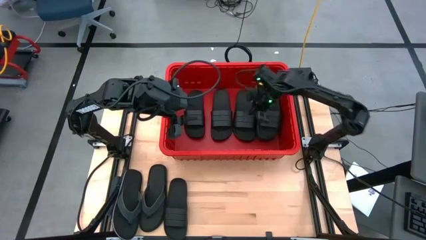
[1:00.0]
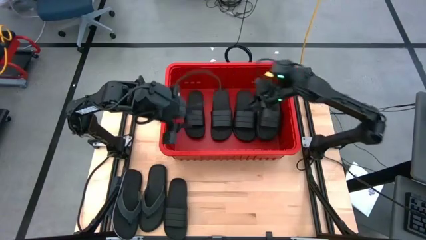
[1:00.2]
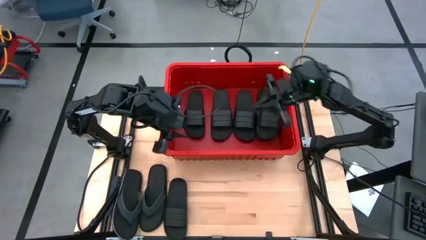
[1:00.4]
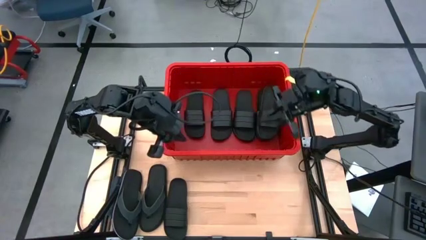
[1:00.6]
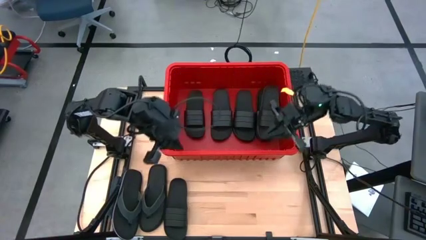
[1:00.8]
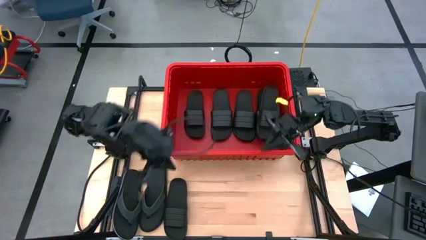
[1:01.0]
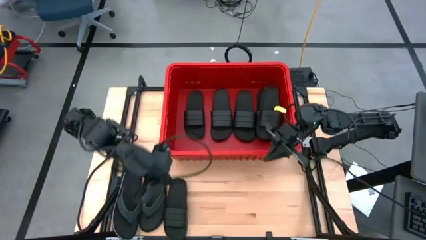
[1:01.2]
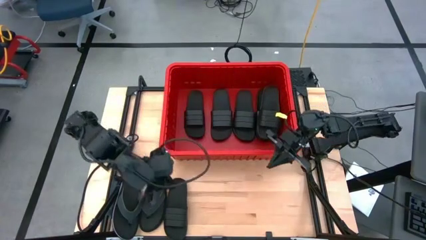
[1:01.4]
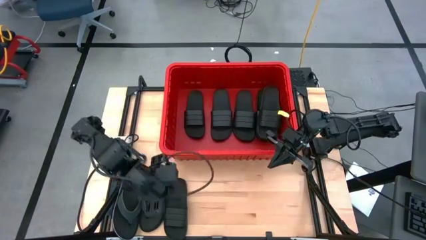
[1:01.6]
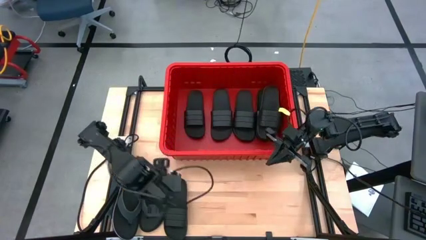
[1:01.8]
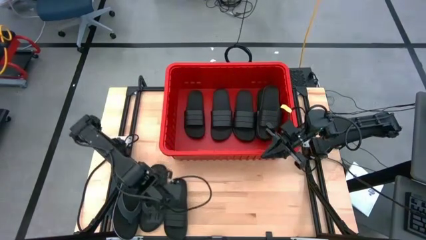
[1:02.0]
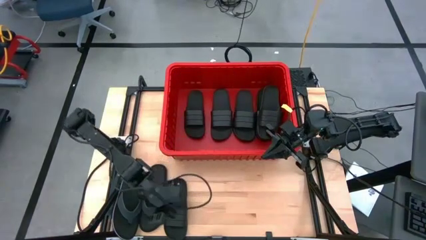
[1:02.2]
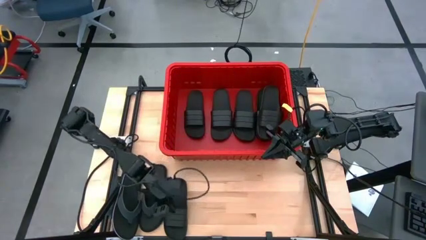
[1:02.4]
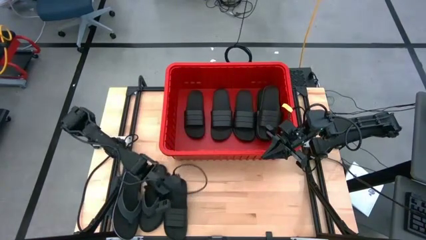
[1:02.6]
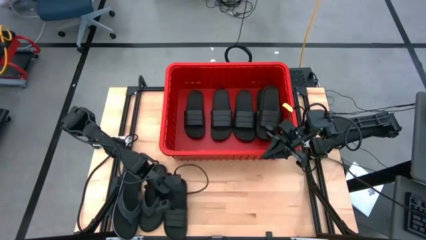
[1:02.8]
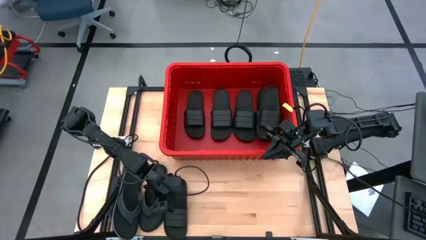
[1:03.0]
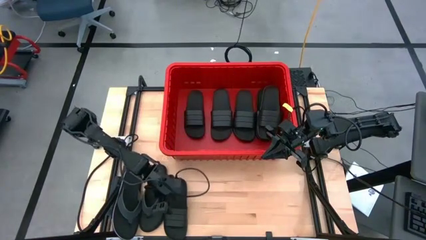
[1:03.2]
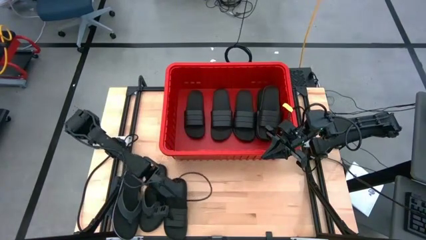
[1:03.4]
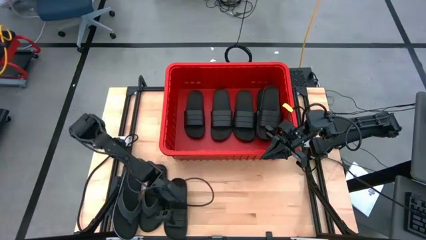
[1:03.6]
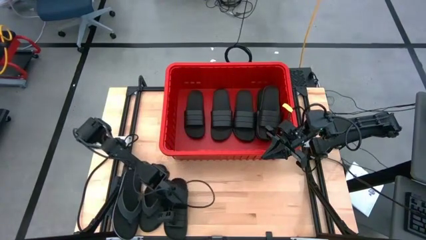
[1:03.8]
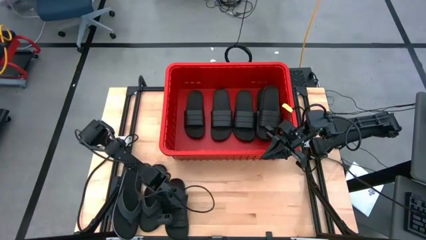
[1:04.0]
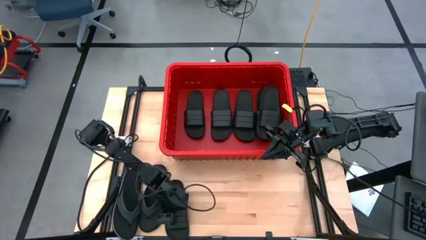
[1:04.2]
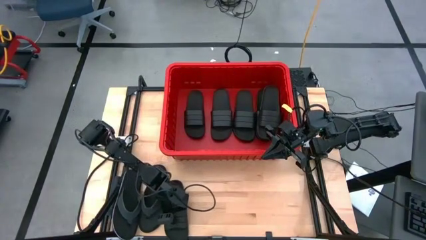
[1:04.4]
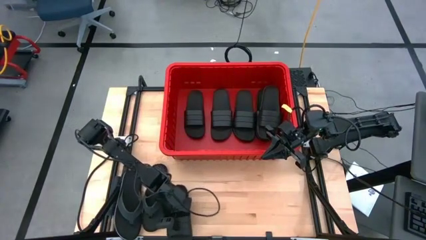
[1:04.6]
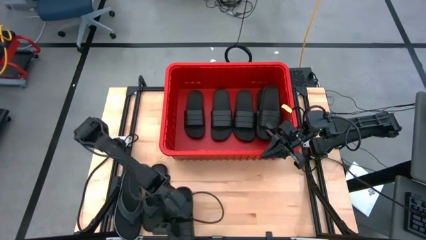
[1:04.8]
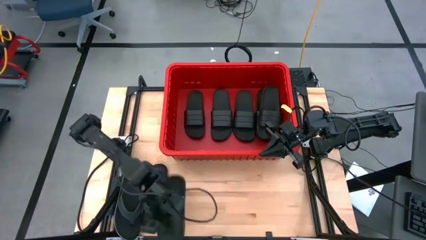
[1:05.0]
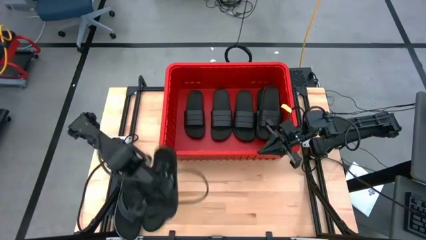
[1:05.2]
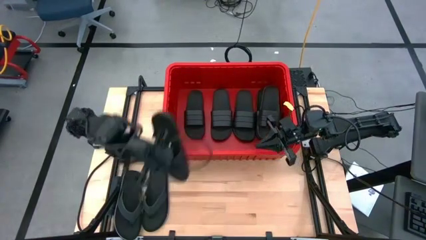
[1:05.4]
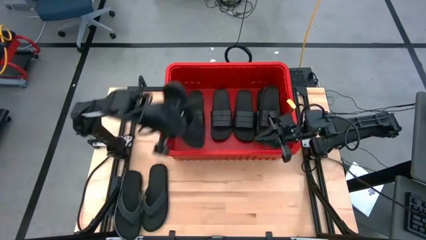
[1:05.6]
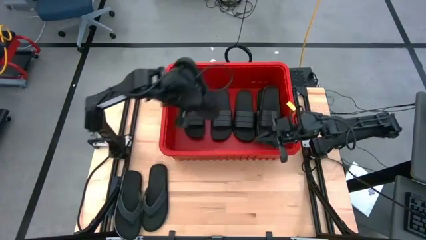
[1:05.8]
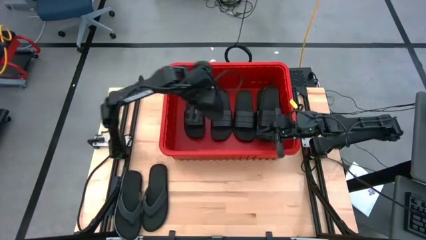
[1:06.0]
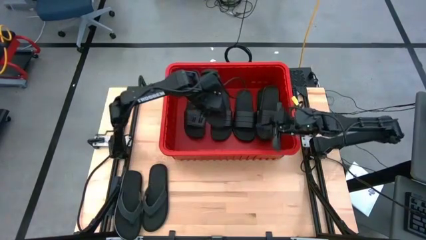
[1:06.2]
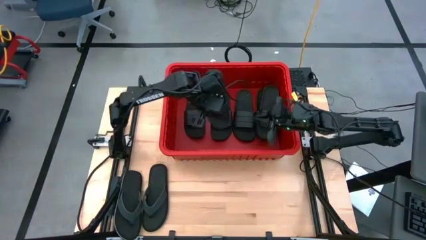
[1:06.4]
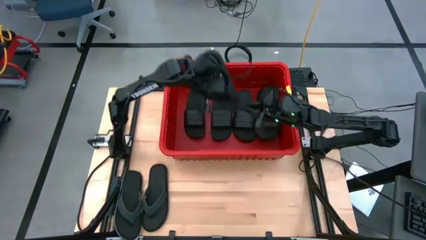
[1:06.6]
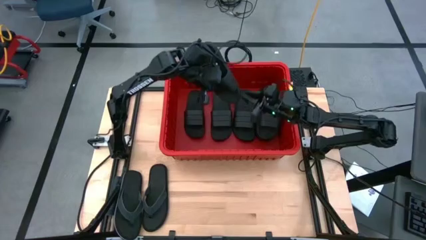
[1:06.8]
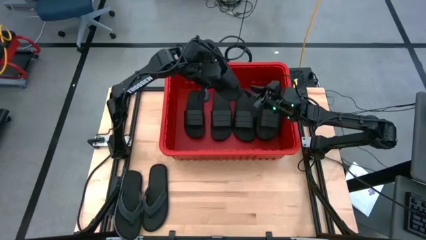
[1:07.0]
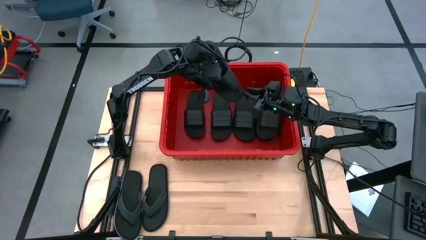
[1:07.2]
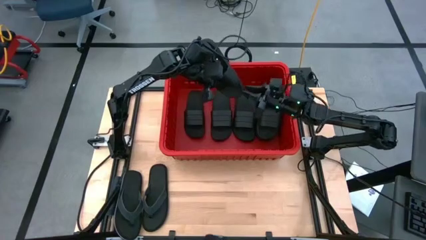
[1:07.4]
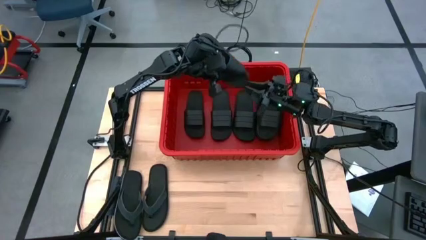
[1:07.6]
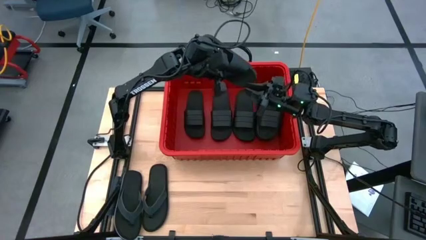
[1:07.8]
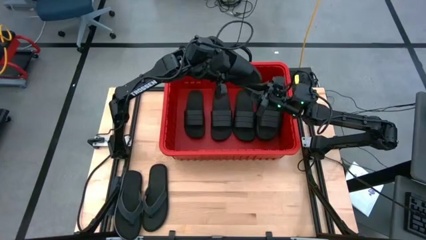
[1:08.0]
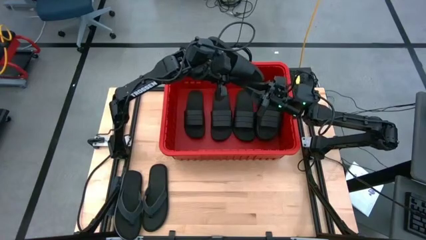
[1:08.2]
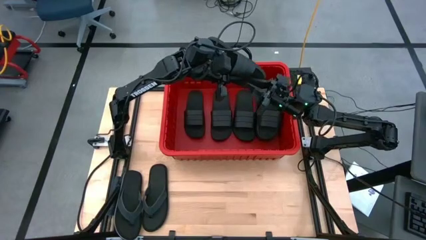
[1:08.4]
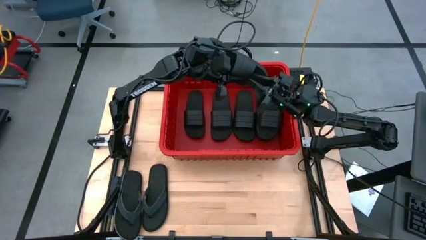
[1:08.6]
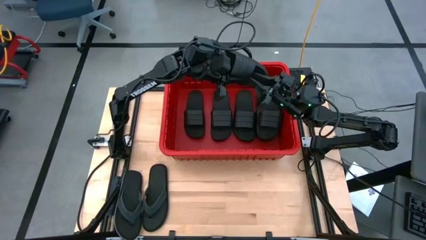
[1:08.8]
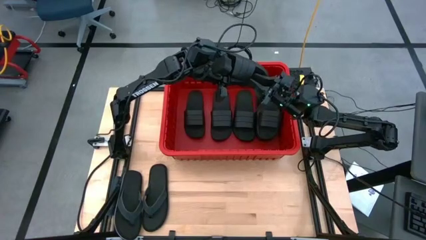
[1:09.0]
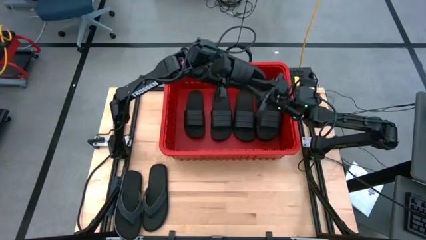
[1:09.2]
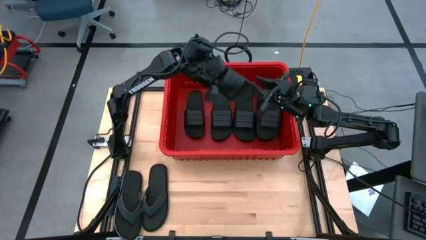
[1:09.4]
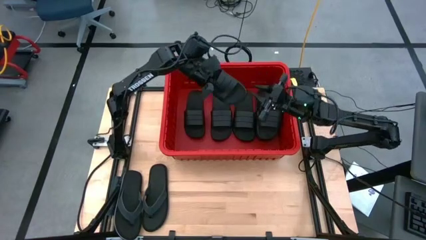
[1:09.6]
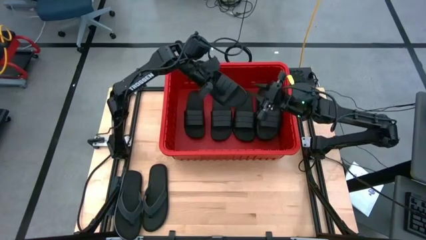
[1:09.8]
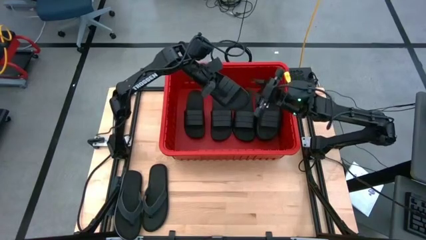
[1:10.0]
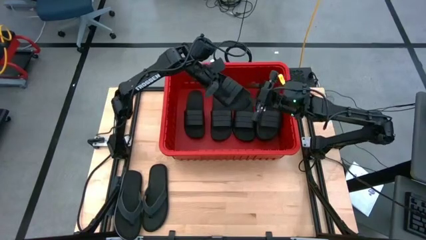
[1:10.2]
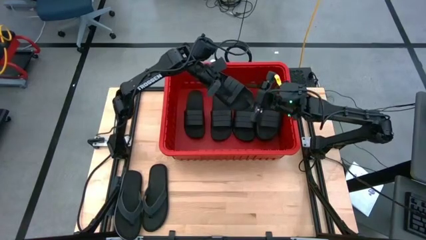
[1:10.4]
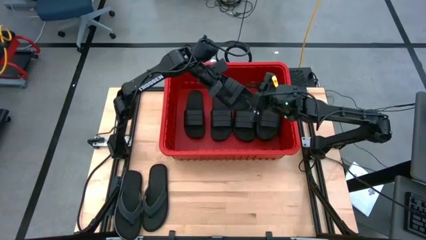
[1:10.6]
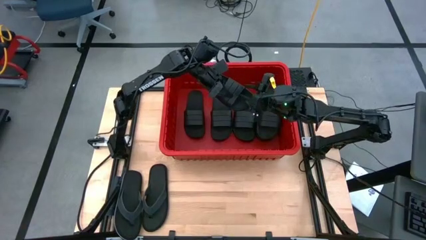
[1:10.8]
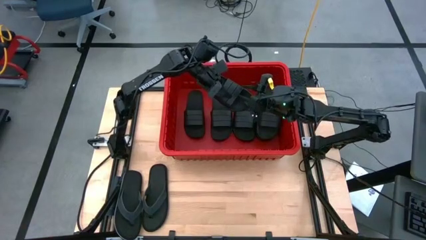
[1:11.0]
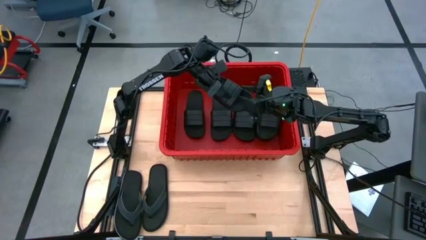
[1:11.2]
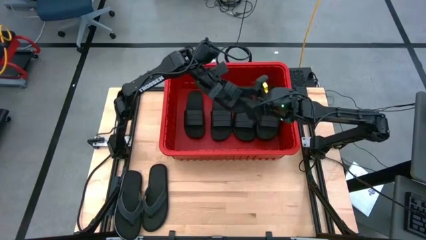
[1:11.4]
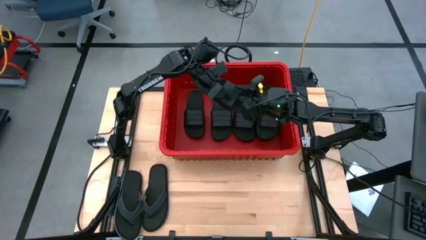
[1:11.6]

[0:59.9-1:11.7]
Task: Pick and place slides into bin
Put the black slide into the red bin
